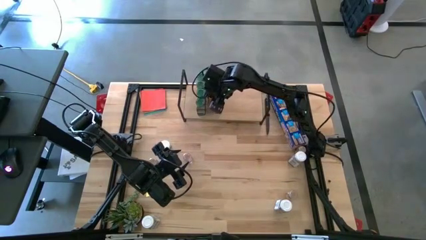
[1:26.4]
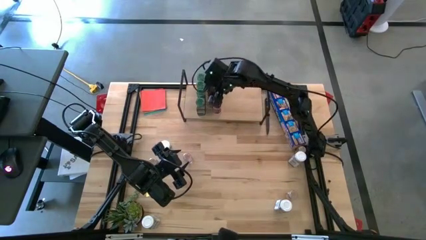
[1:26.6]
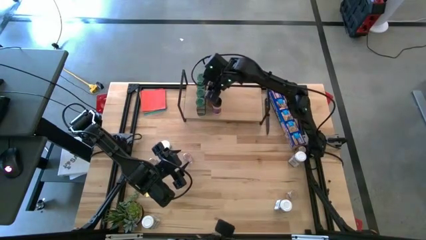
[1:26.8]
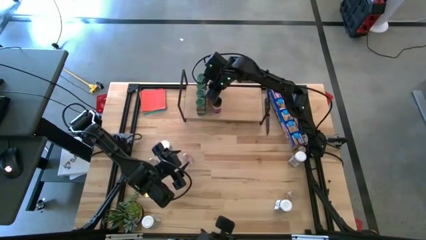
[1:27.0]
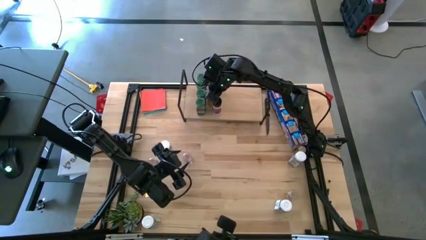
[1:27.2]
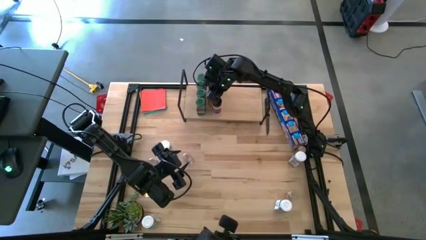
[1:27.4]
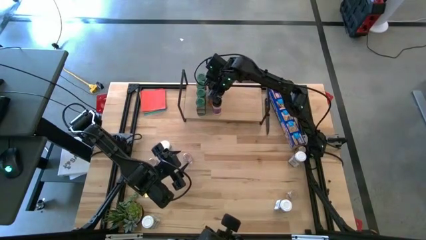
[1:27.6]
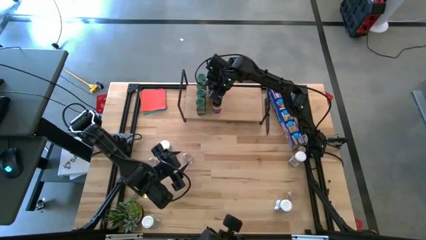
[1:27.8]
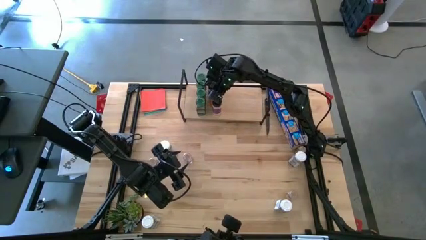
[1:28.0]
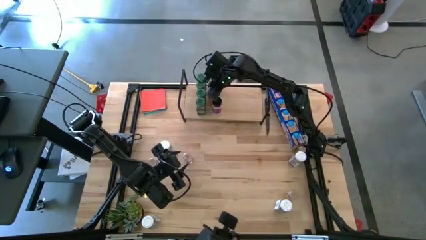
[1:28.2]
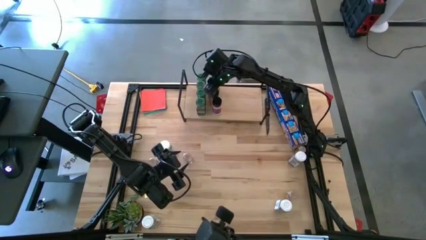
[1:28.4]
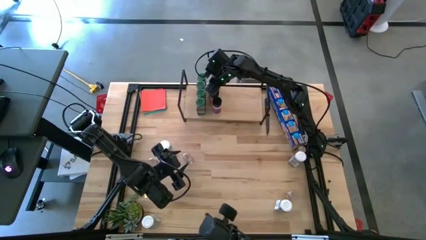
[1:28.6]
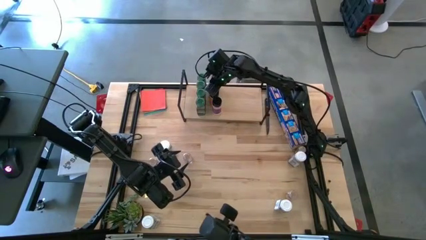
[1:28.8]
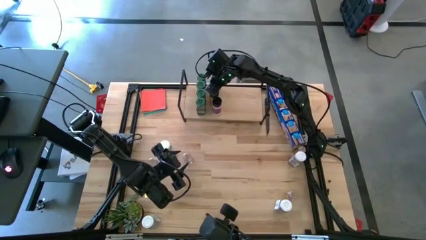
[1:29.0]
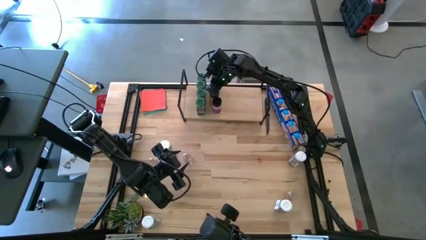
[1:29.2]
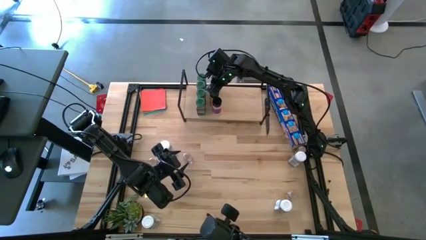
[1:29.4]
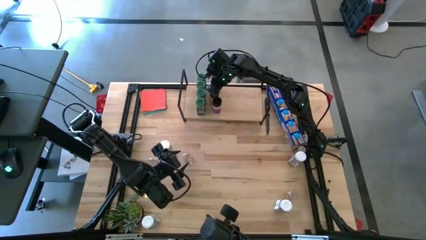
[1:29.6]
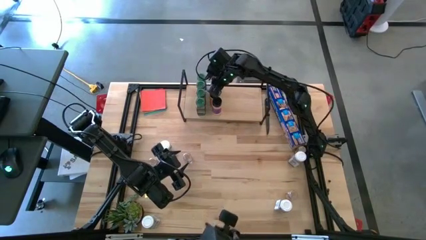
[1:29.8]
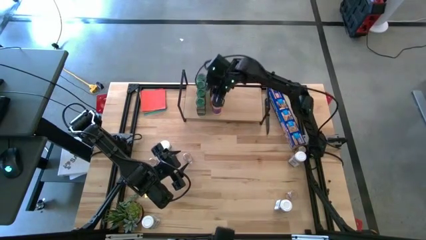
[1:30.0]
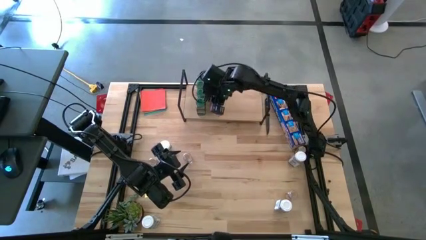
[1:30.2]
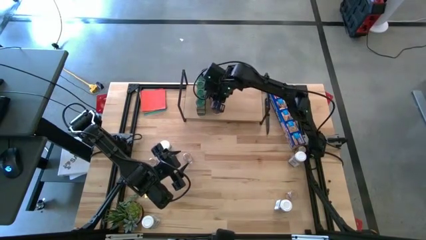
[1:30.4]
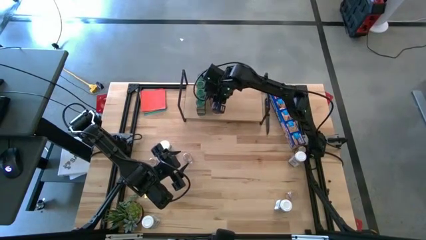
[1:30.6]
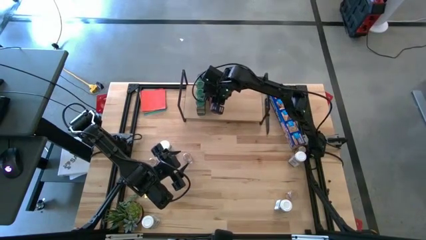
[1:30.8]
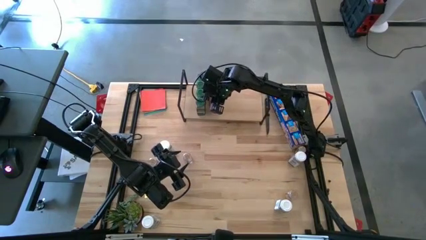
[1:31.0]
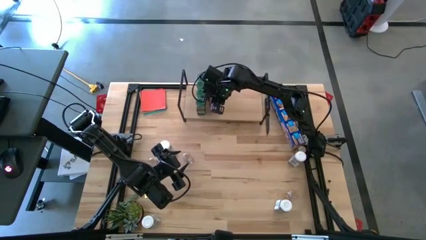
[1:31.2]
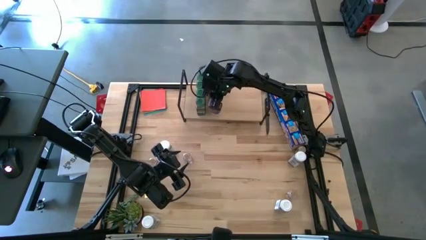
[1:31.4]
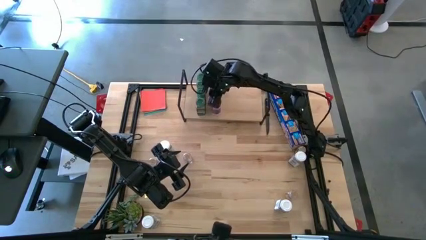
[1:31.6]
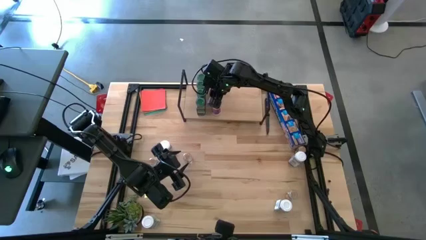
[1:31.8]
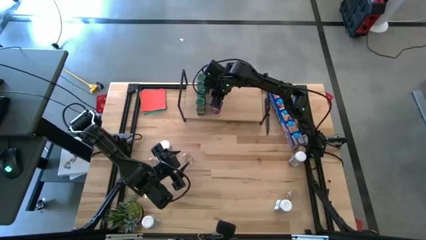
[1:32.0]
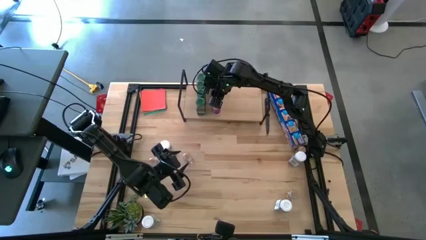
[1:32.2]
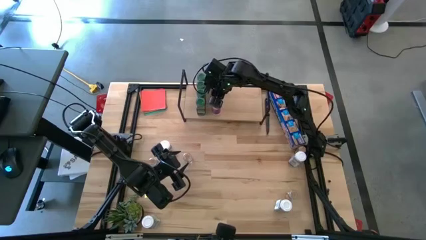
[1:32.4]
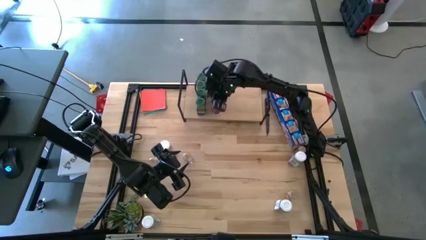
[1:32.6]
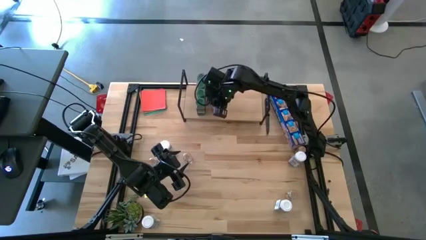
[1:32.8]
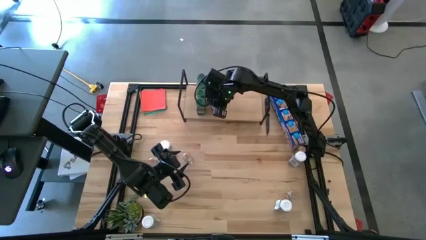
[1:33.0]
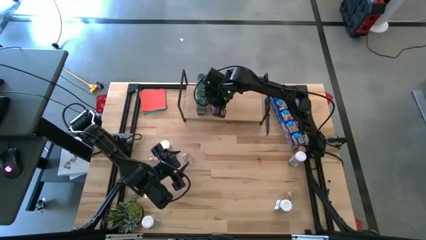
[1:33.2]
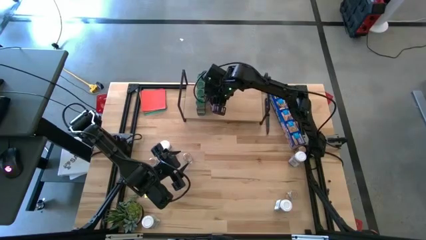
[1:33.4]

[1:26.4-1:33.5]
Task: Shelf spices
Adjust the black seasoning bottles

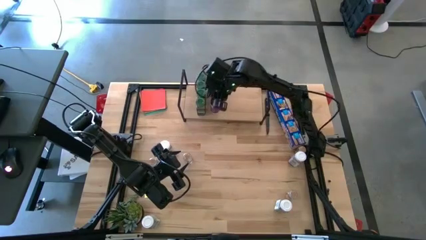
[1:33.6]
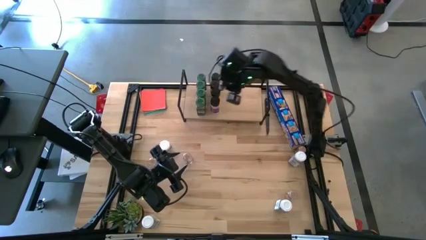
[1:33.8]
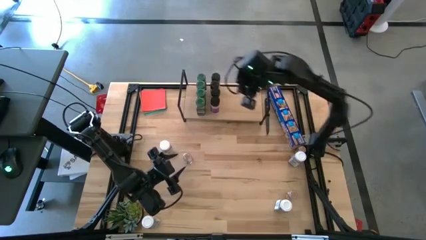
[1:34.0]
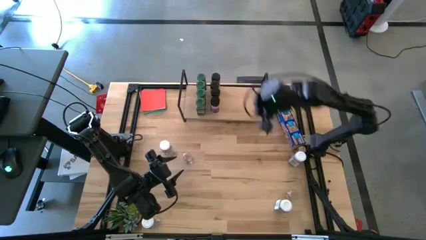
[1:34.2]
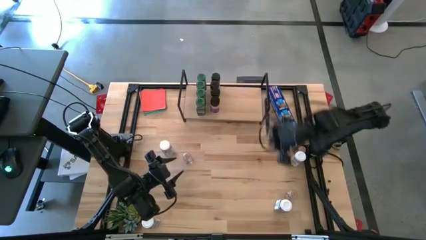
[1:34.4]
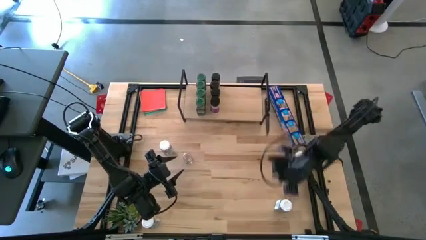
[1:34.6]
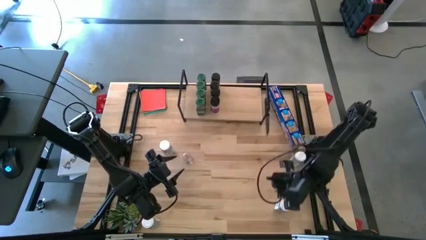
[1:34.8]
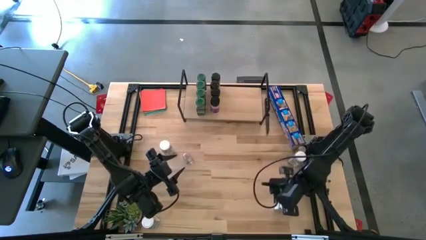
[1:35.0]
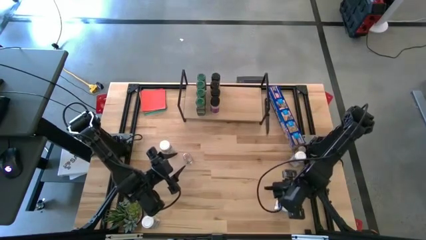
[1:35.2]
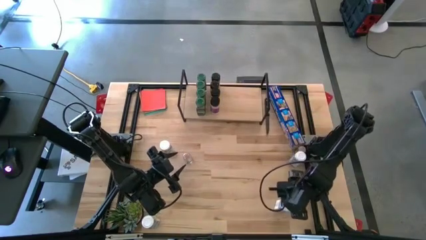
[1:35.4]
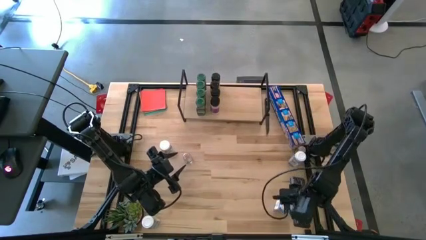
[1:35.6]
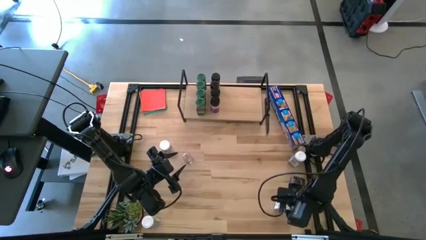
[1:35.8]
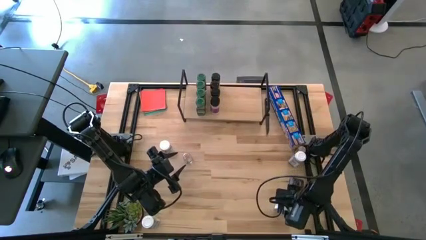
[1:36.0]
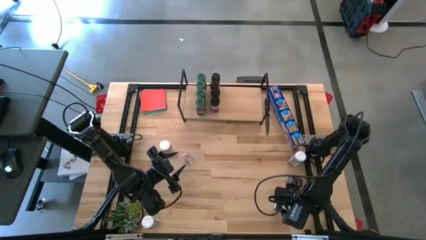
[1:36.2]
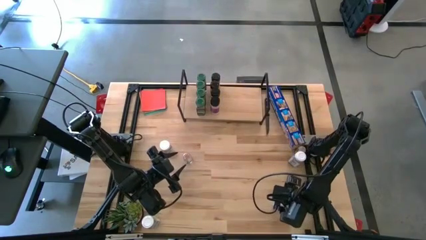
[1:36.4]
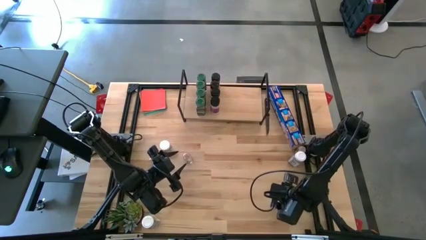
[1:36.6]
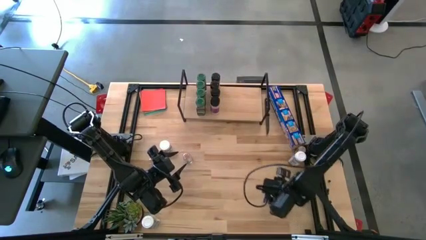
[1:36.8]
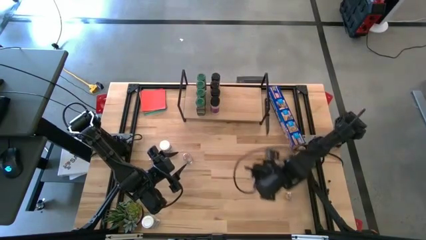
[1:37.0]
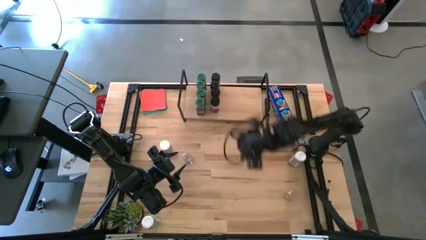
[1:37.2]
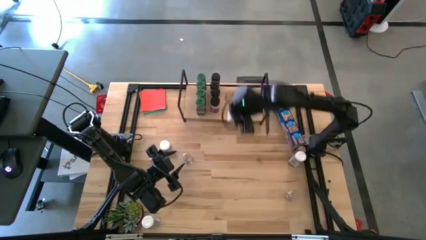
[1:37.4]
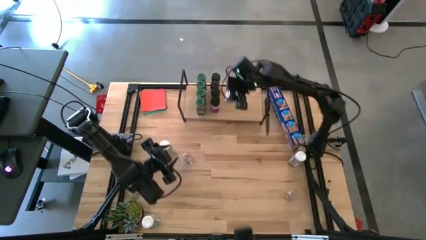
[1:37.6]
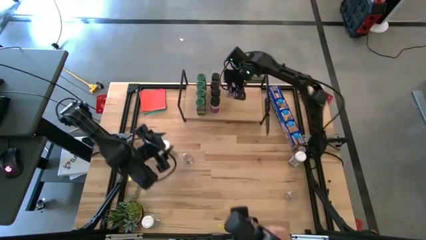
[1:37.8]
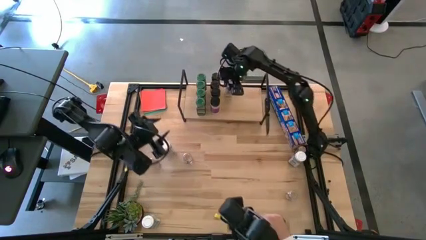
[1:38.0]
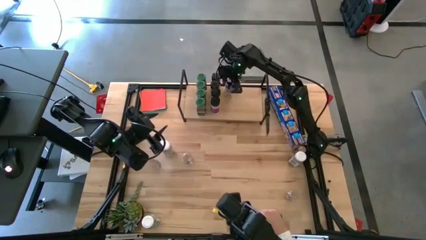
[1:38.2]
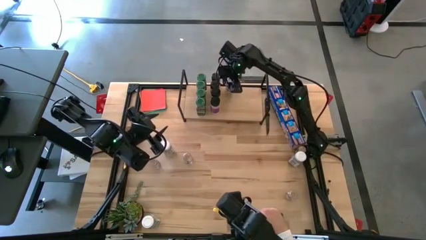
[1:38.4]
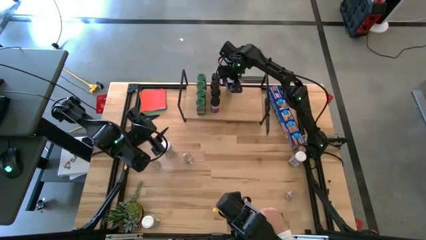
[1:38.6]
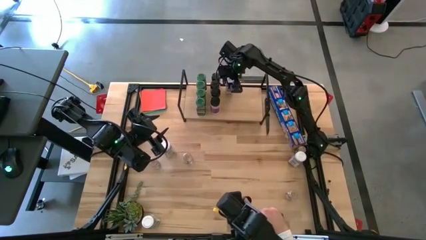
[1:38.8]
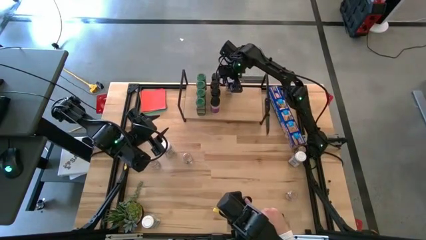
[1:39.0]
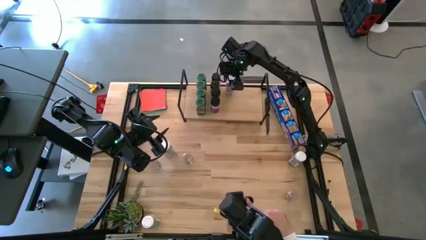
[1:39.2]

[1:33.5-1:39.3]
Put the bottom right white seasoning bottle on the shelf

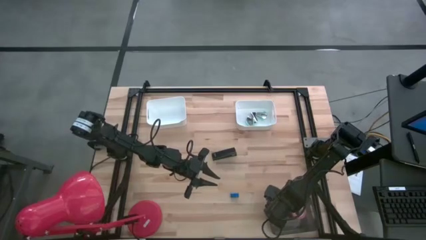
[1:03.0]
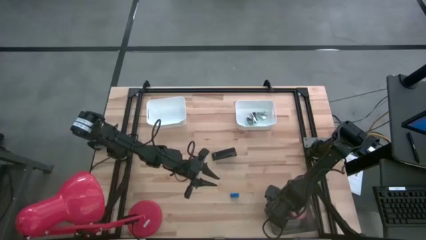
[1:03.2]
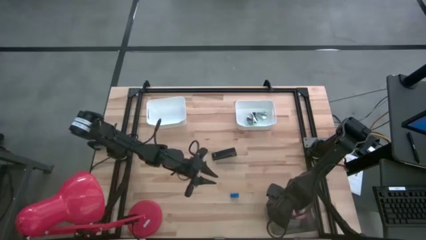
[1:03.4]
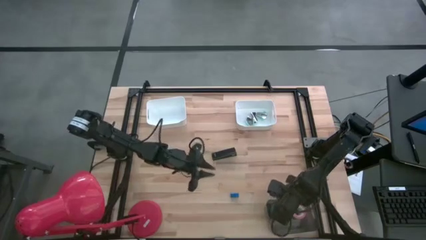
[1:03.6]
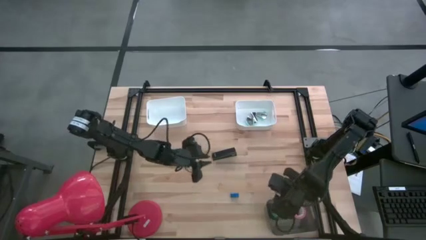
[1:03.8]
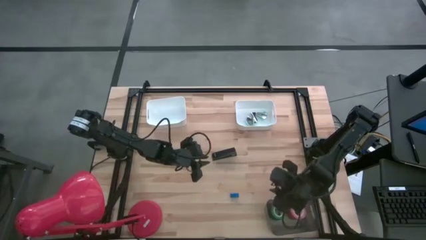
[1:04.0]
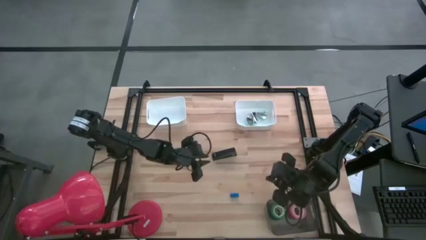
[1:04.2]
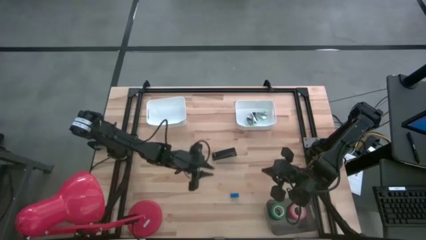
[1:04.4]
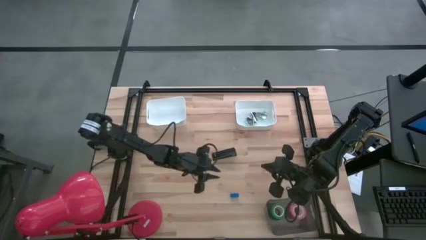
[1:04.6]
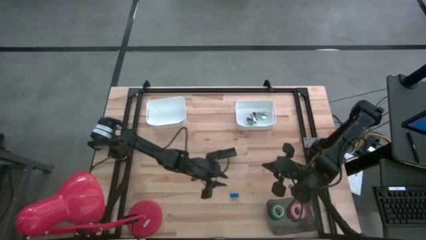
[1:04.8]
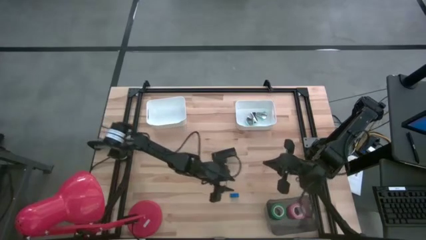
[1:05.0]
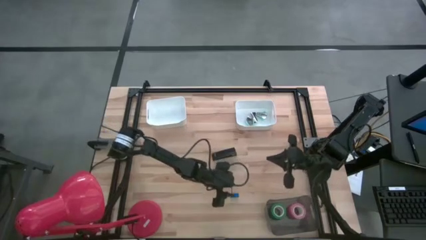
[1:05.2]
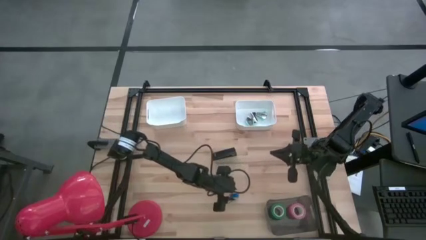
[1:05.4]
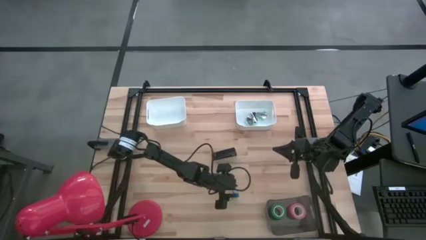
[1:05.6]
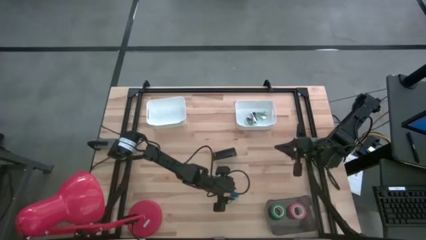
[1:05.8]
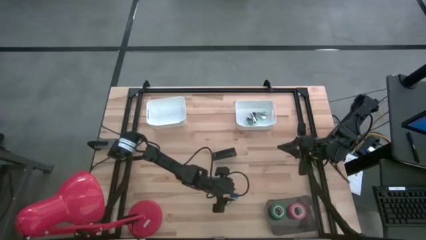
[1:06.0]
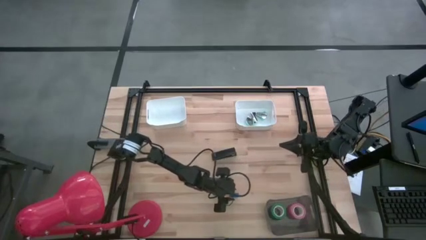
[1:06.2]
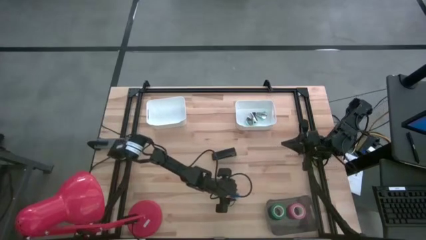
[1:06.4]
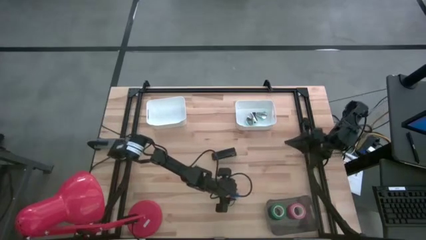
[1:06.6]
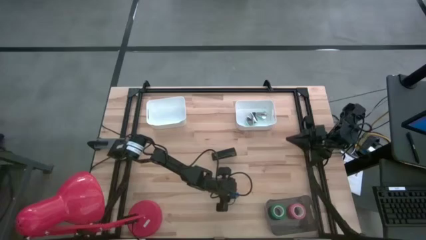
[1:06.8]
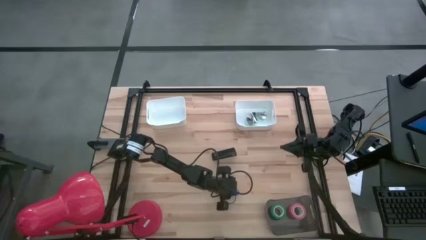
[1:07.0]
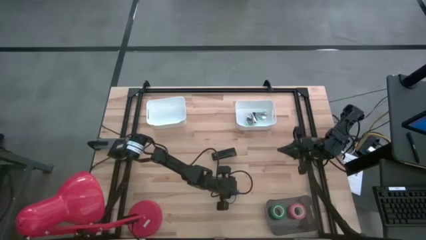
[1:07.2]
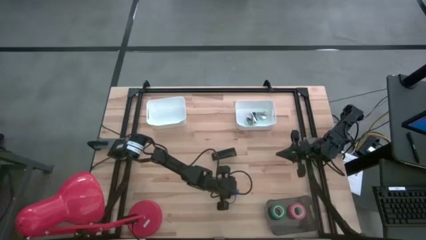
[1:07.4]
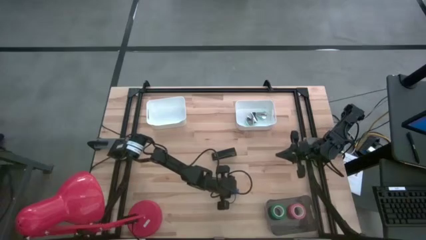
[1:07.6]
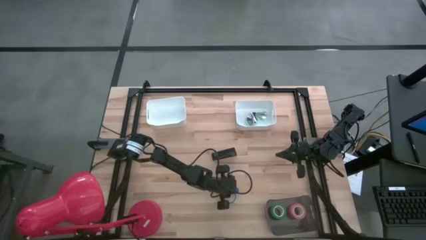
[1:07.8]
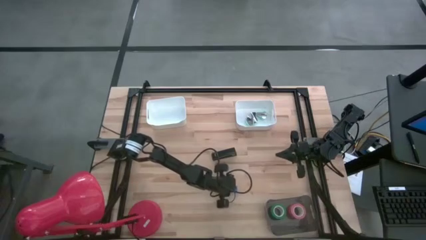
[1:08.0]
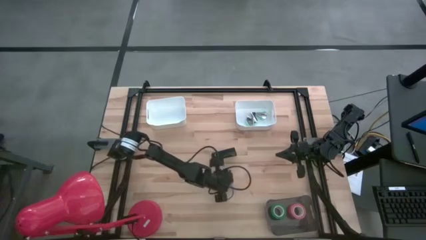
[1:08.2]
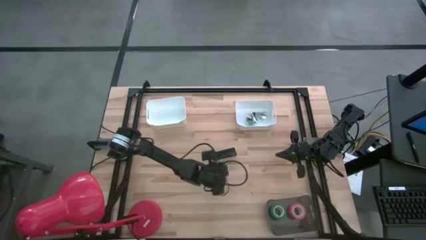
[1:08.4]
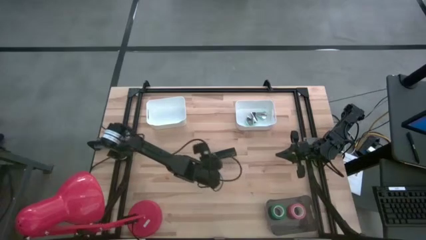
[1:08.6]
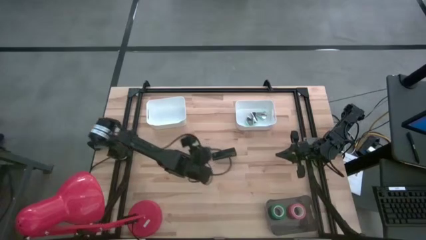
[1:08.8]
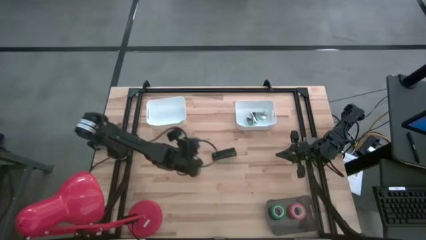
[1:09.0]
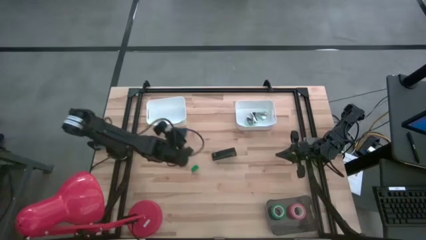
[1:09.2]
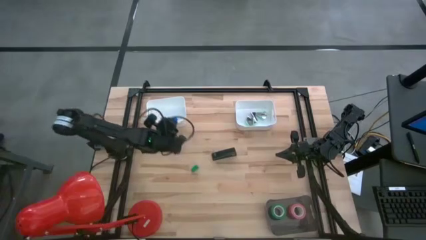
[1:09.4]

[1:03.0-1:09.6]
Task: Pick and place Stapler, Stapler remover, tape
Put the blue stapler into the left white bin
